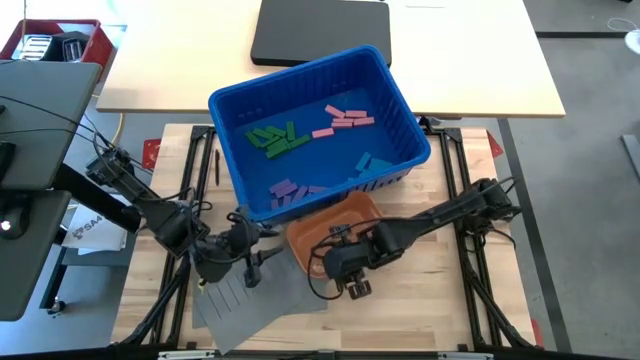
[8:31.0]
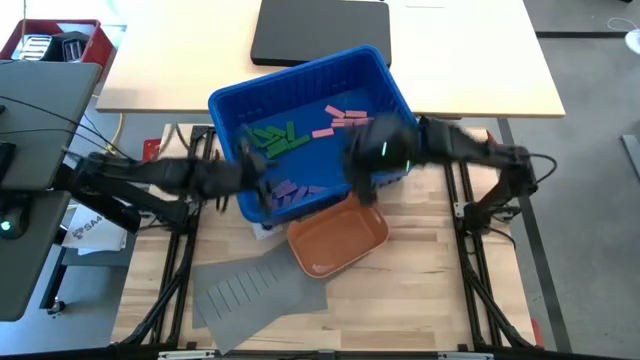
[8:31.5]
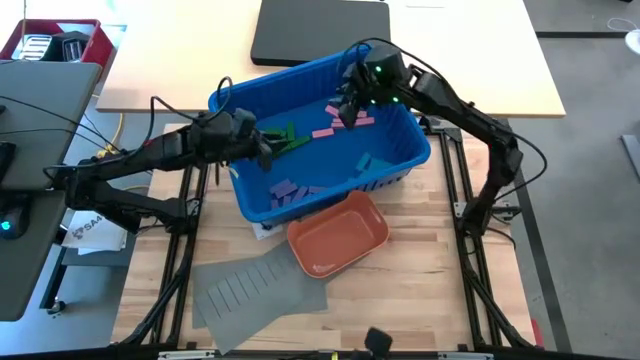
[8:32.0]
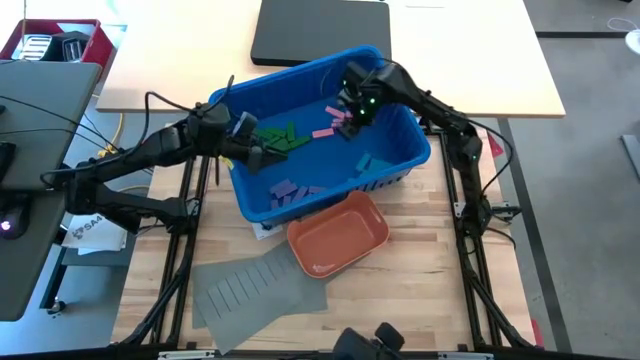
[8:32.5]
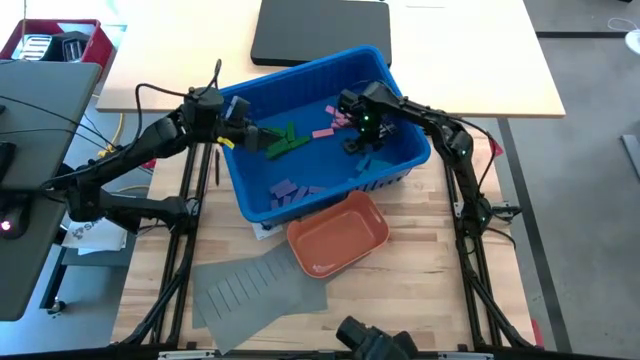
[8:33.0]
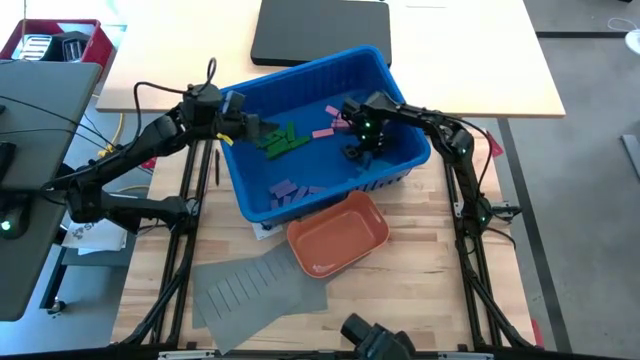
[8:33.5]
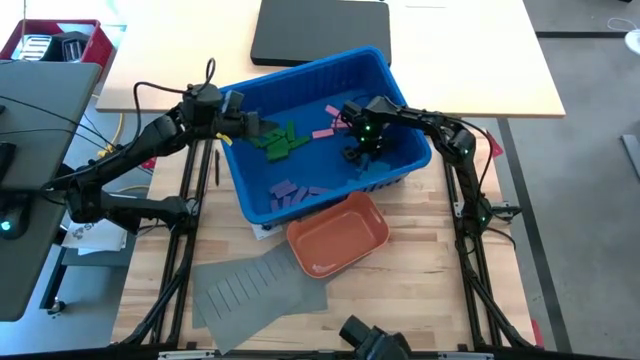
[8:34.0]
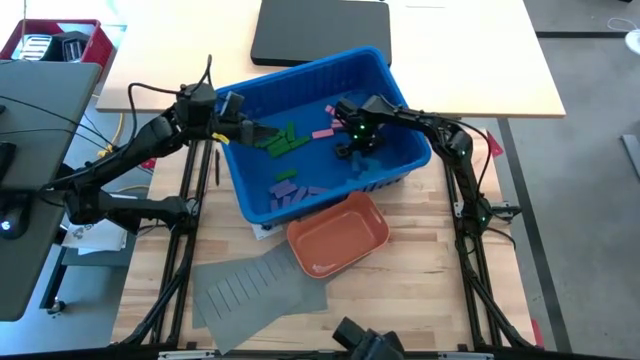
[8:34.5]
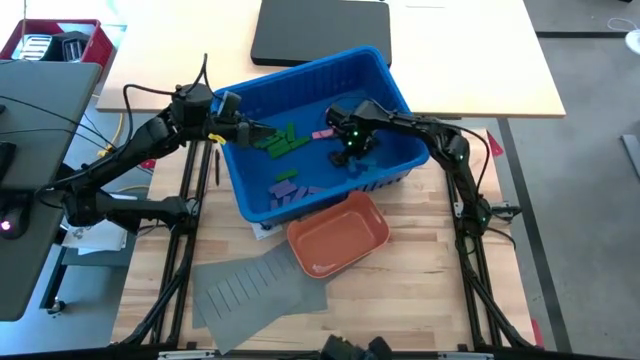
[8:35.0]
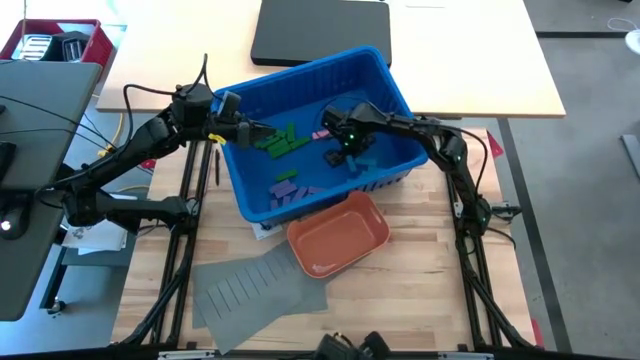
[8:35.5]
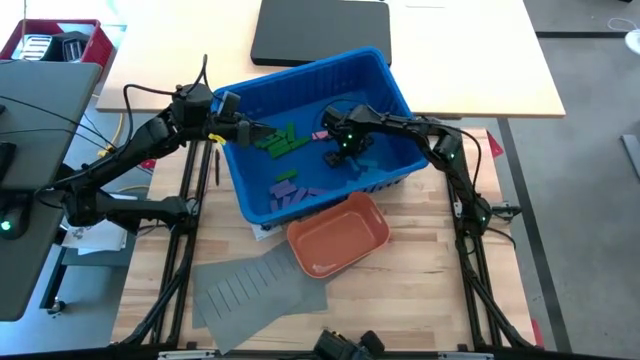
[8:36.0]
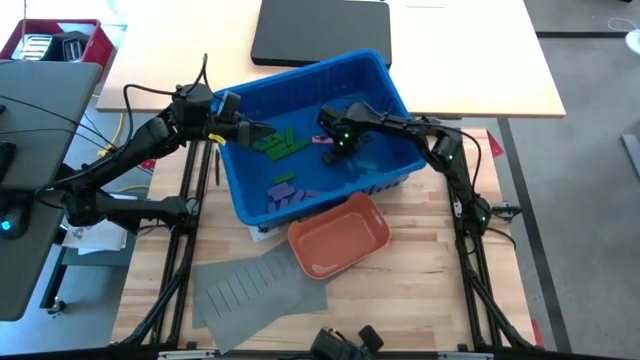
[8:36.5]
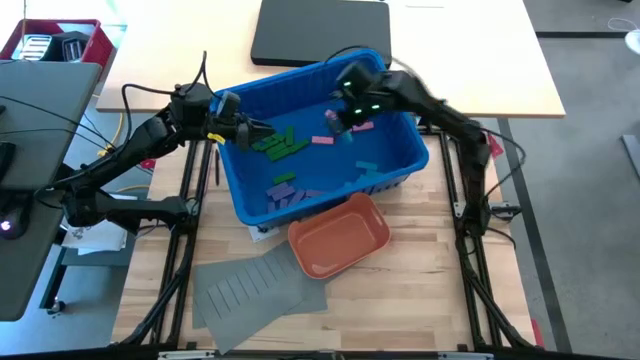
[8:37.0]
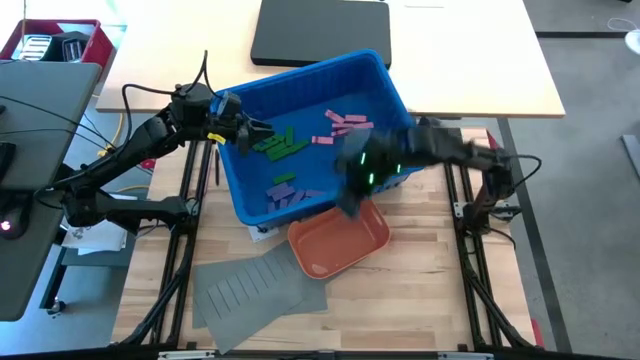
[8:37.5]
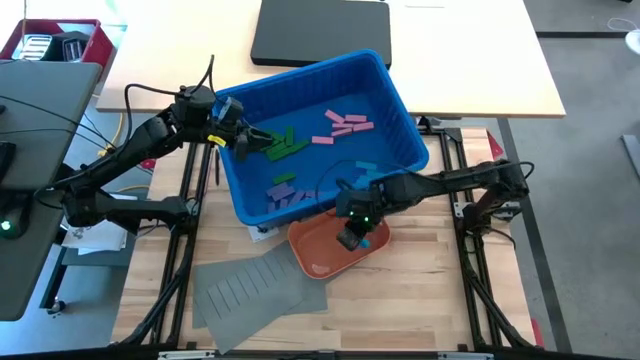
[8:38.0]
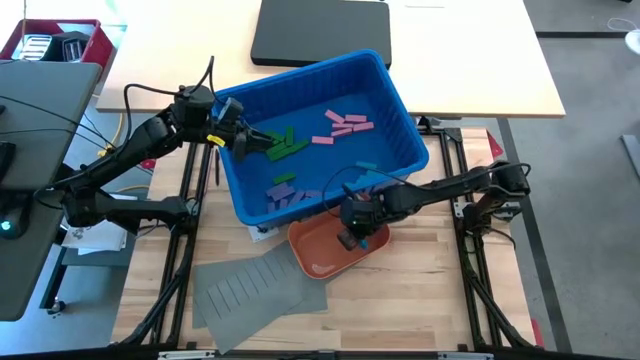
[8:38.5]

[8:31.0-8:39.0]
Task: Sort blocks
Put the blue block into the orange bin

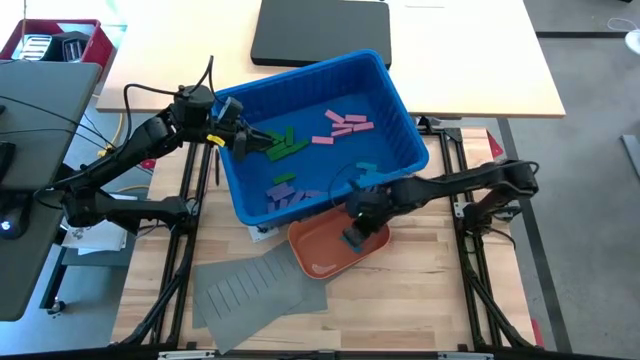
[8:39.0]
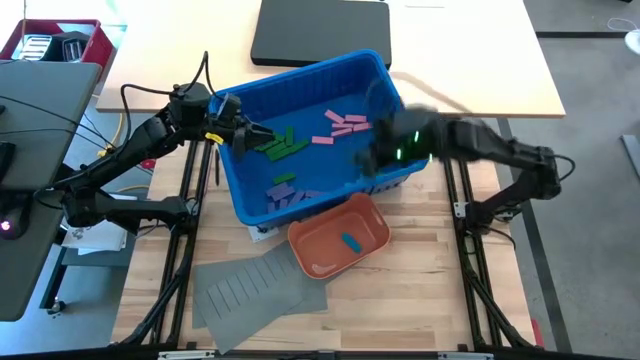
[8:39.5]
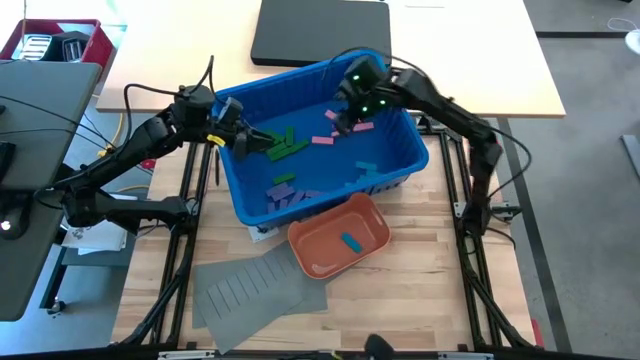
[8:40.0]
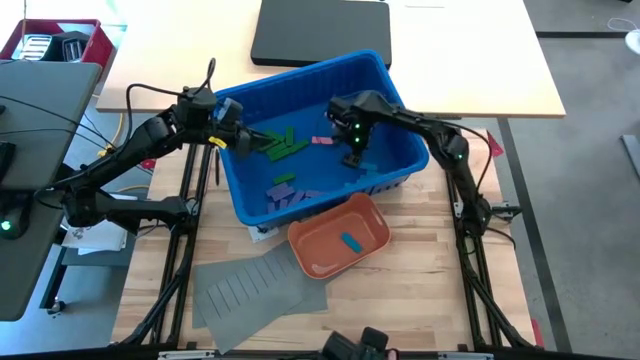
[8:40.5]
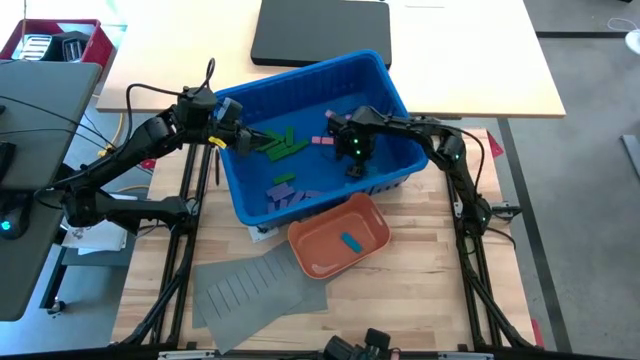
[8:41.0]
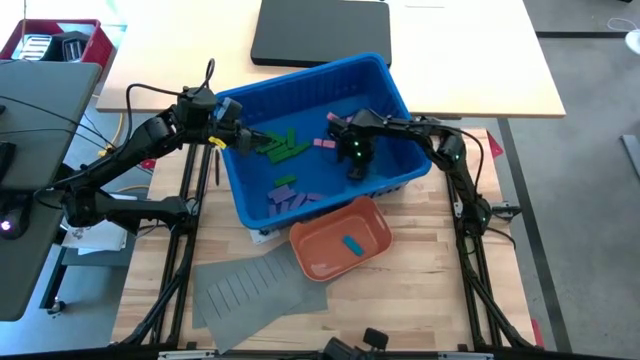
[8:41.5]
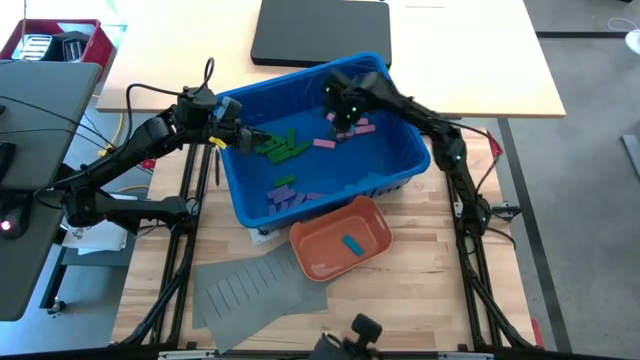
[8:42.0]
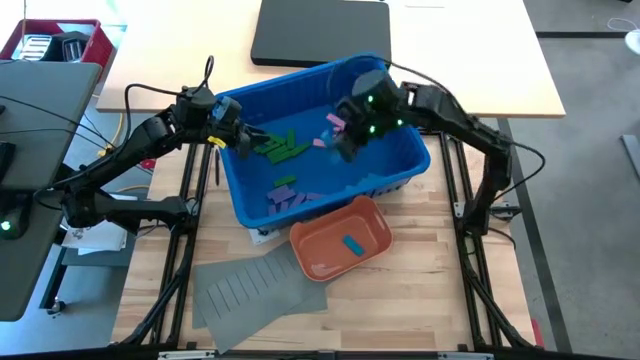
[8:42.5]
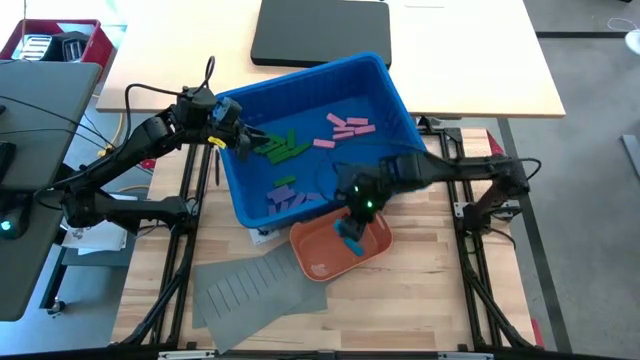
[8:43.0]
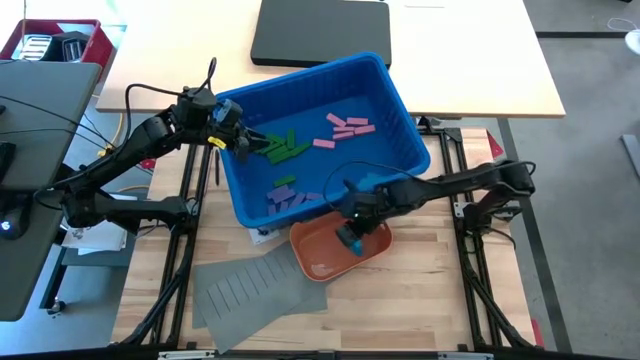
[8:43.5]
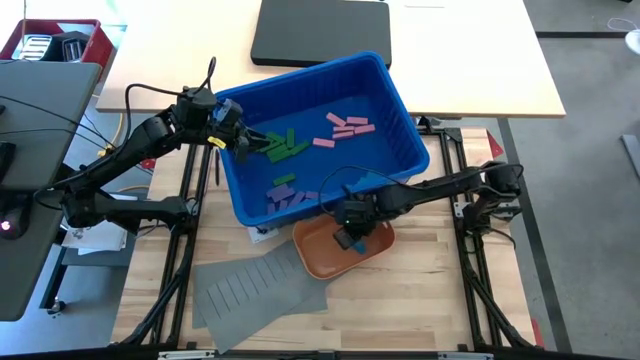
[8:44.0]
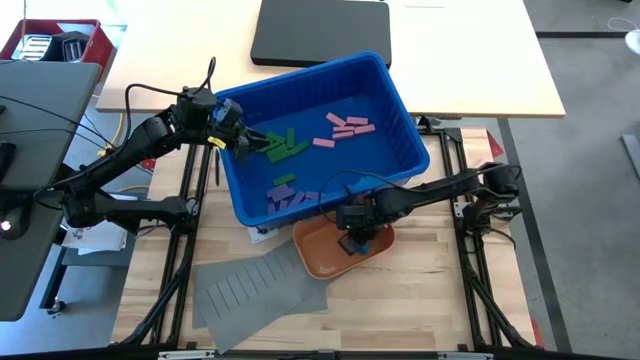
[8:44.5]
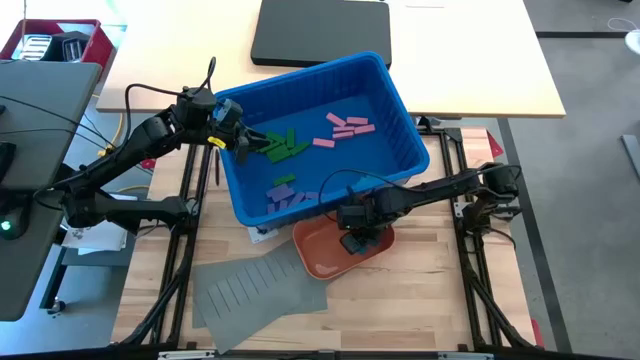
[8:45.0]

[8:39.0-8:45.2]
Put the blue block into the orange bin

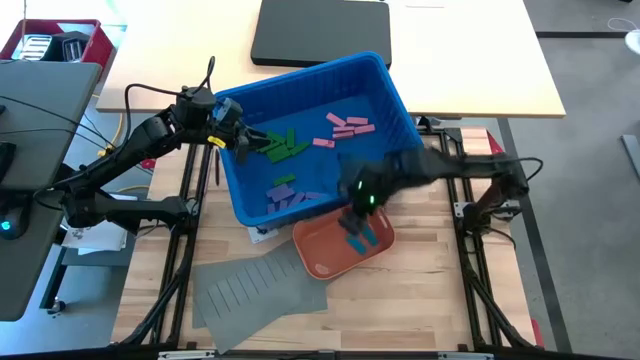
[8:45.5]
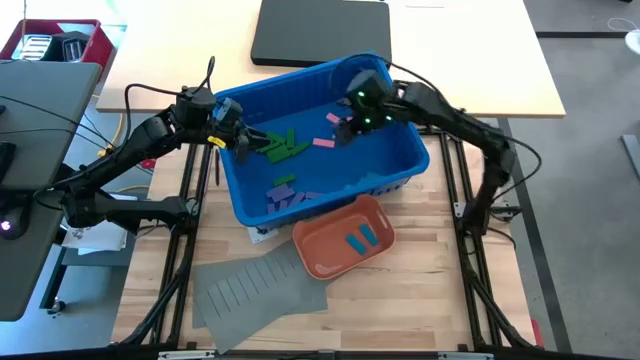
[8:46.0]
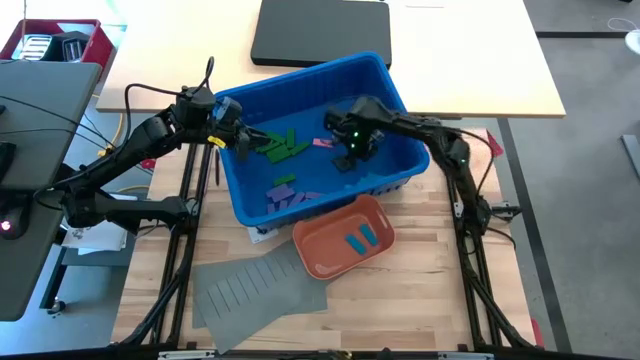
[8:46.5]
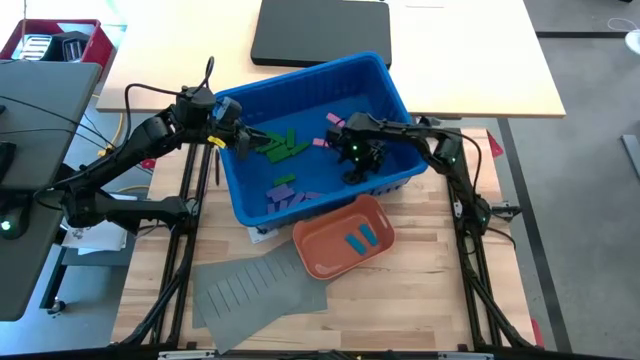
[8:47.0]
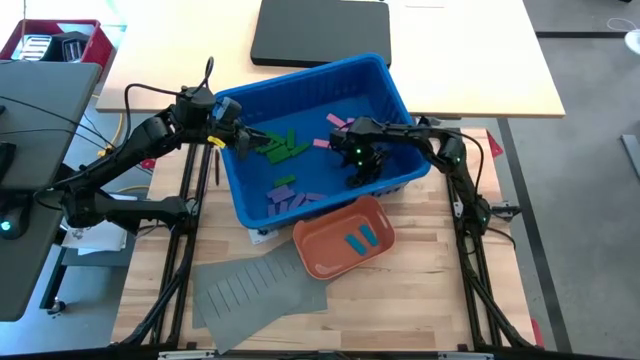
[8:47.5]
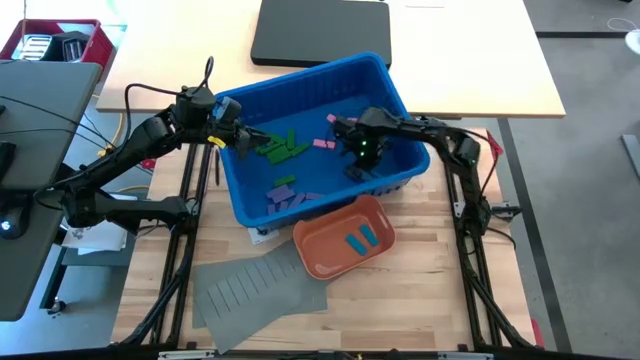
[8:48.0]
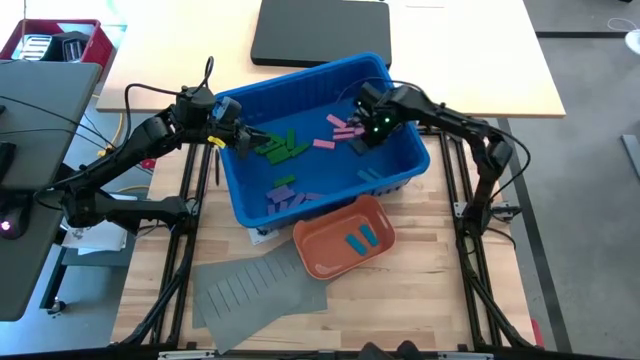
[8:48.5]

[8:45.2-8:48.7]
Put the blue block into the orange bin

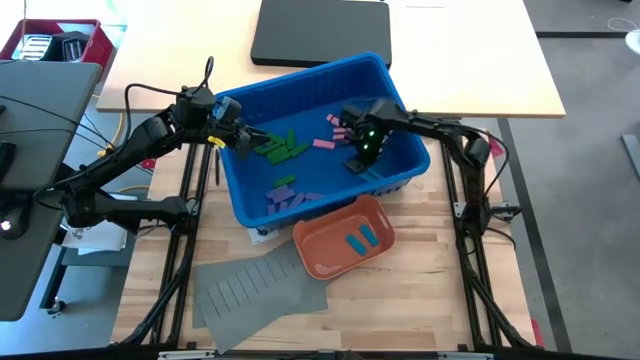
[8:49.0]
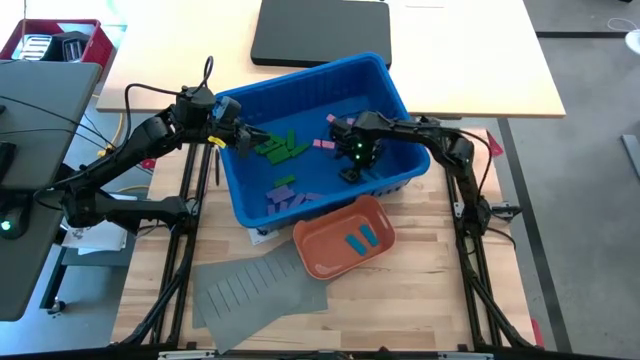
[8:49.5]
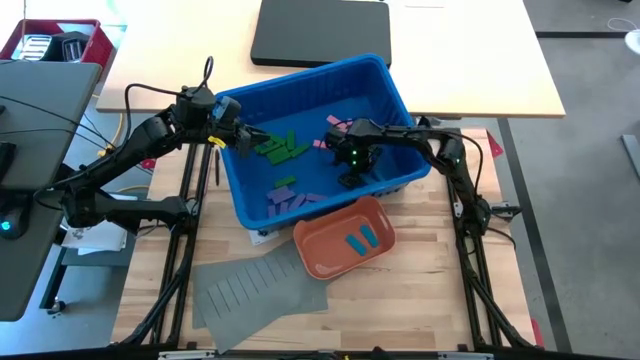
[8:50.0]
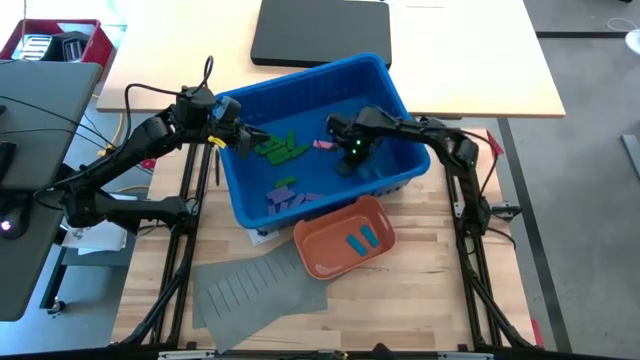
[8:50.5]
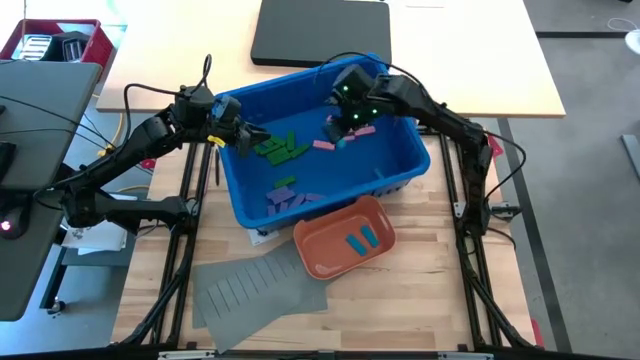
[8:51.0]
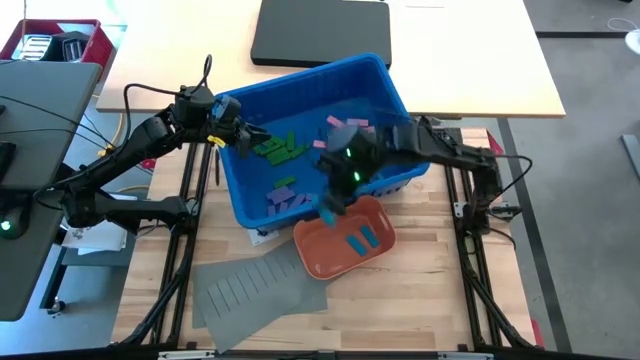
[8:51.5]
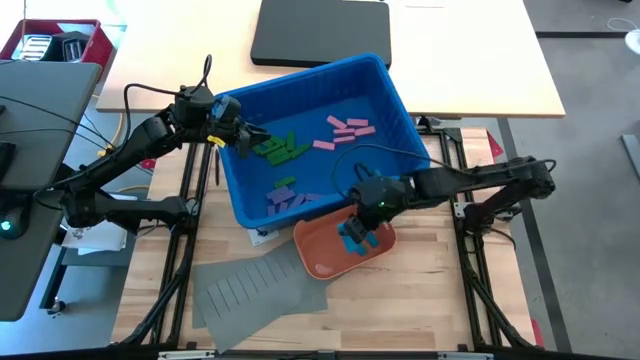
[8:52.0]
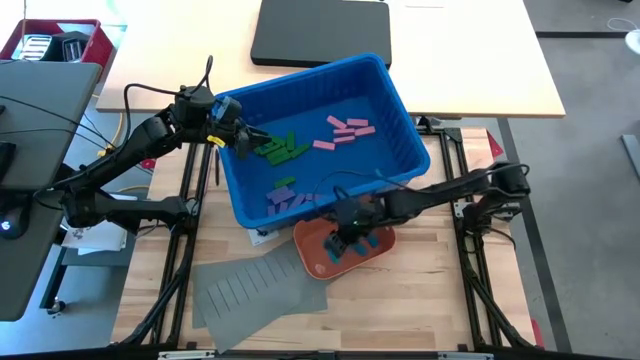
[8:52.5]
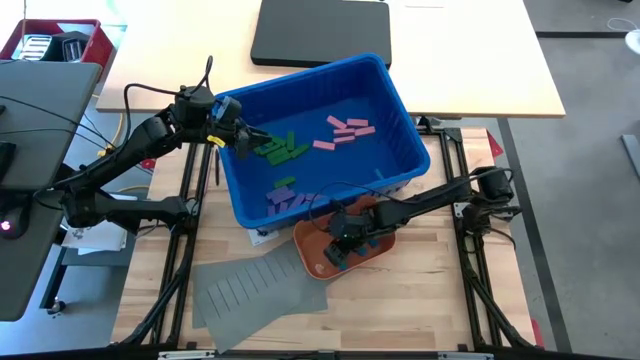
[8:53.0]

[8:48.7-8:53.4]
Put the blue block into the orange bin
